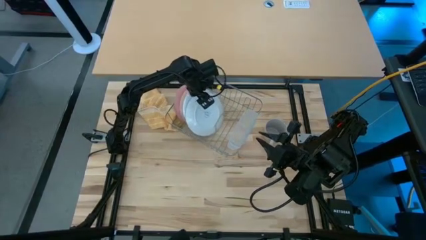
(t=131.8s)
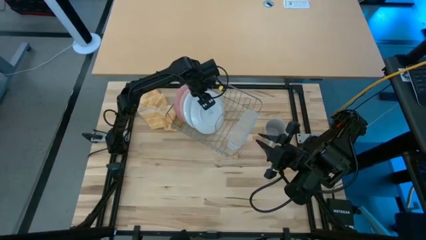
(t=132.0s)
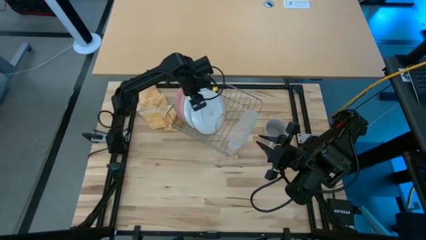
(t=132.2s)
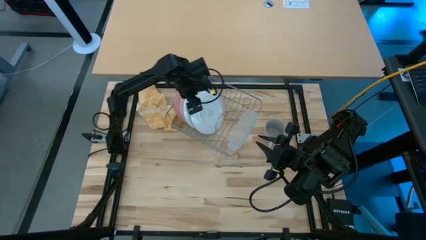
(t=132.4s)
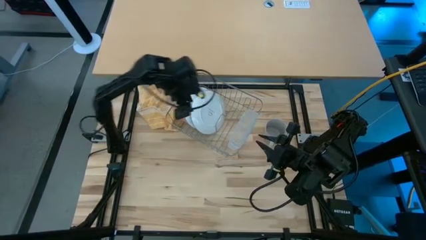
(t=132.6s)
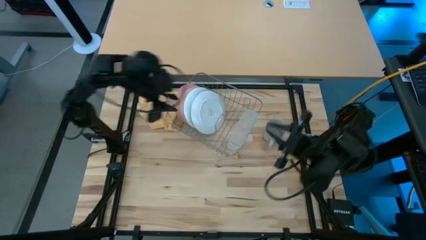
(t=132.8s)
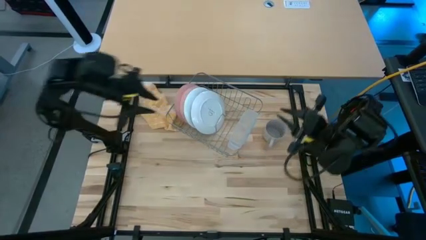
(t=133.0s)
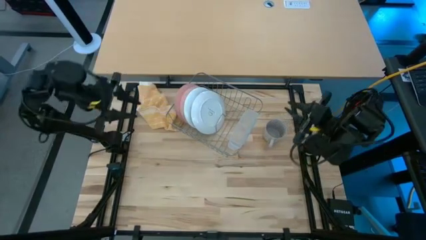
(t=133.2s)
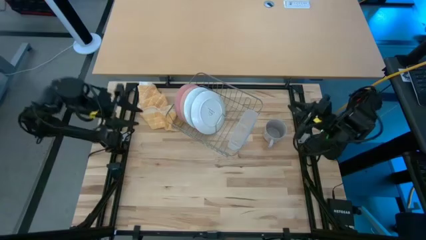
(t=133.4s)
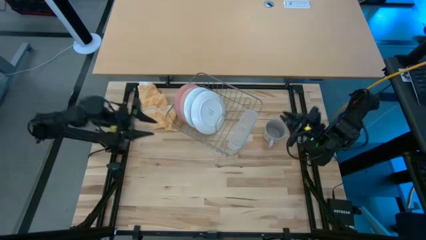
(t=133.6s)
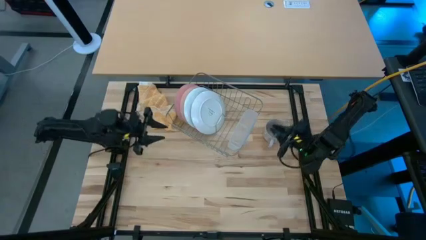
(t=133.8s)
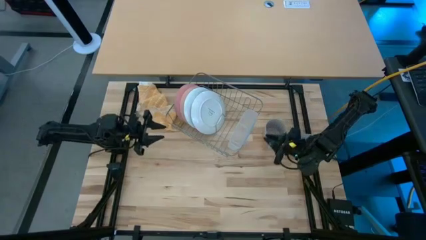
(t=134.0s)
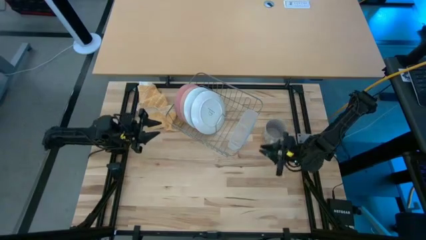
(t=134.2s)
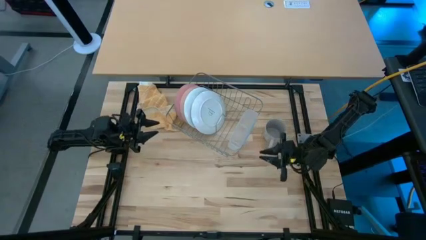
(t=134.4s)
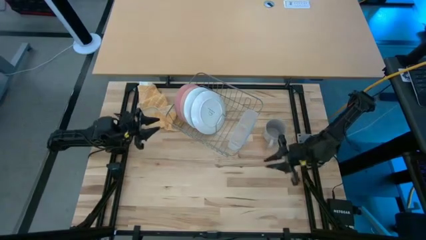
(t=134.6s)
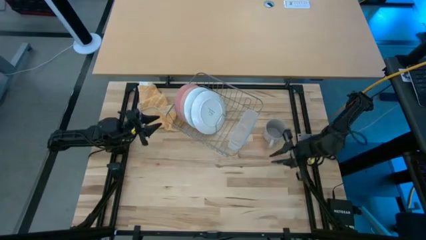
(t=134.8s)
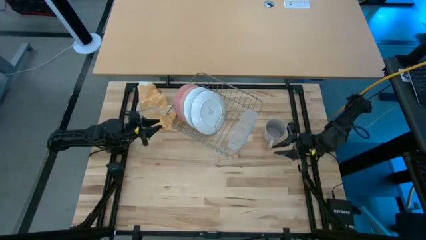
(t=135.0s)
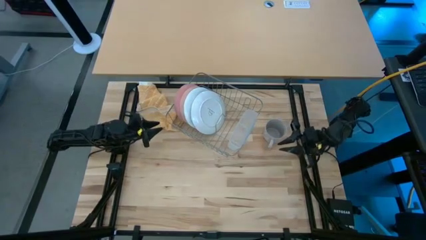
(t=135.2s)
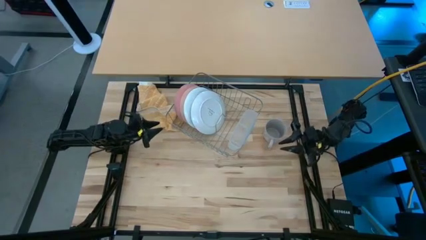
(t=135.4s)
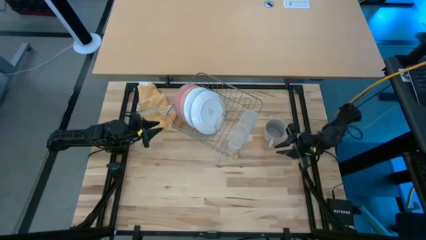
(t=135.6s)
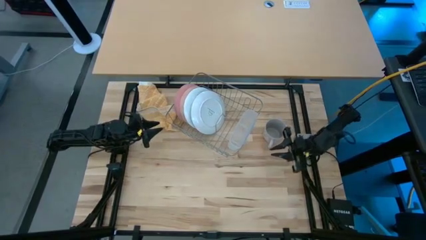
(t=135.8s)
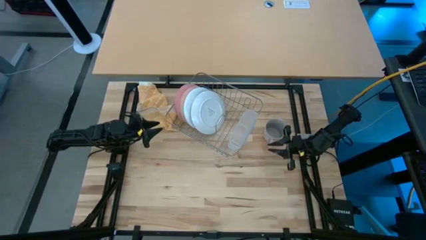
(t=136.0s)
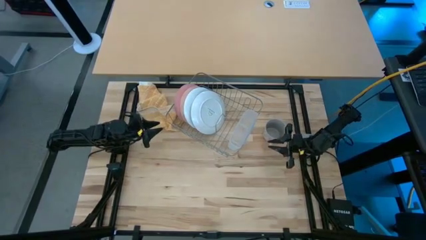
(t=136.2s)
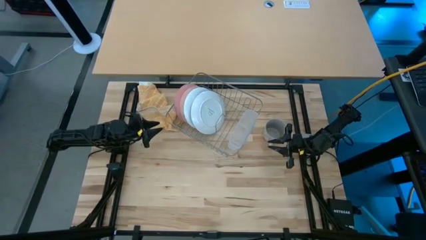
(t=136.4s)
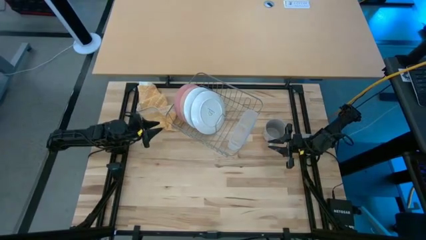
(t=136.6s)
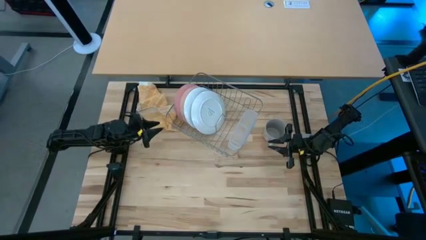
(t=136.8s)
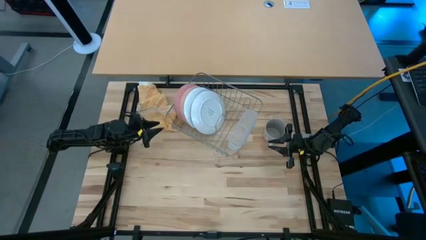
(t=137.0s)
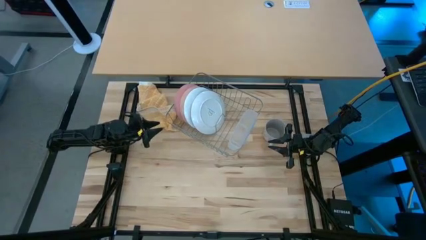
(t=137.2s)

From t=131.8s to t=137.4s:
Task: Sort dishes
Return to Home Position

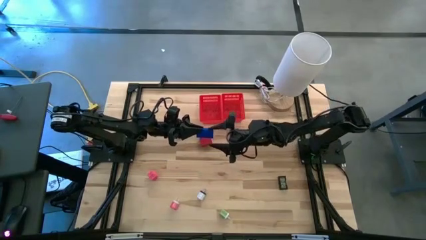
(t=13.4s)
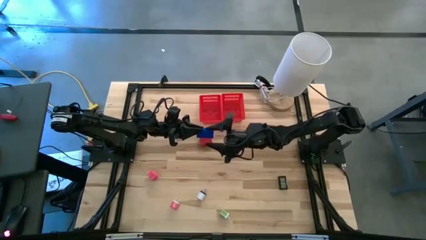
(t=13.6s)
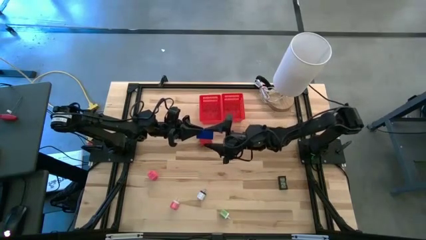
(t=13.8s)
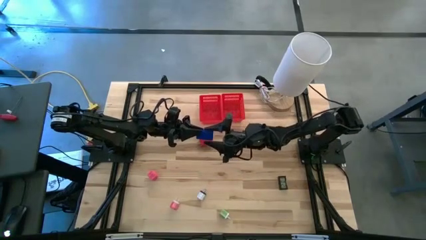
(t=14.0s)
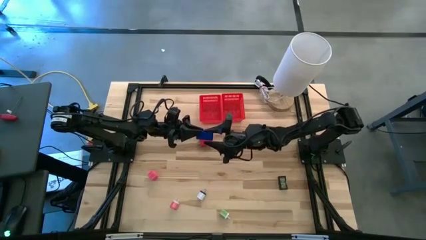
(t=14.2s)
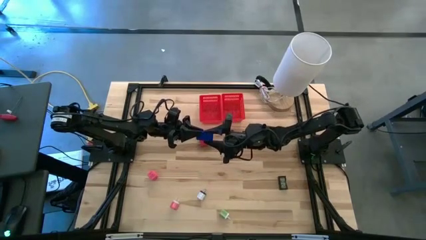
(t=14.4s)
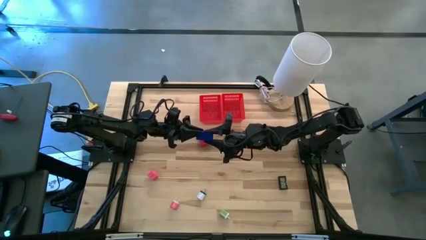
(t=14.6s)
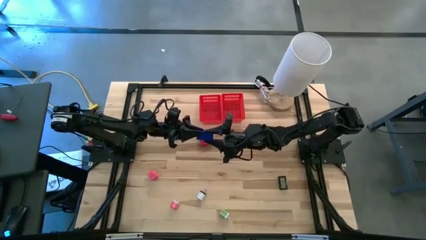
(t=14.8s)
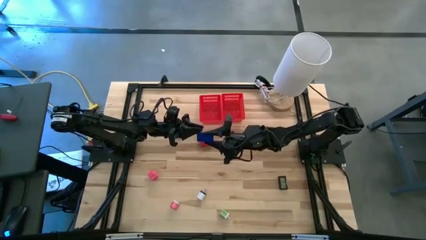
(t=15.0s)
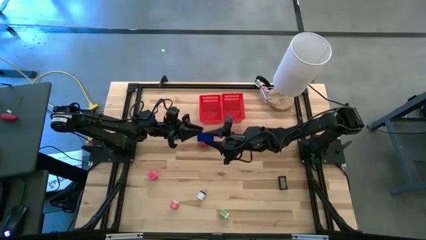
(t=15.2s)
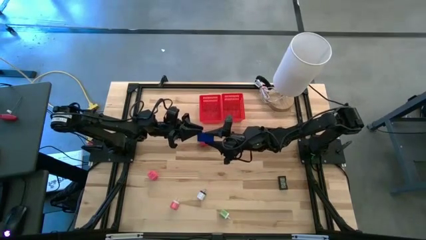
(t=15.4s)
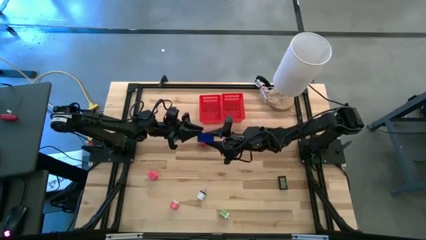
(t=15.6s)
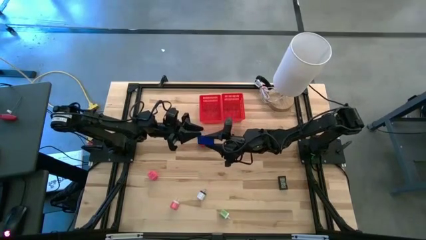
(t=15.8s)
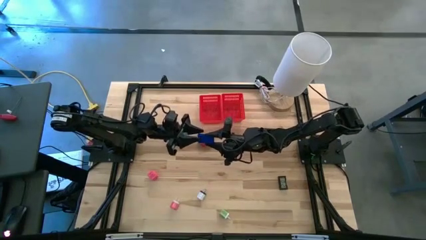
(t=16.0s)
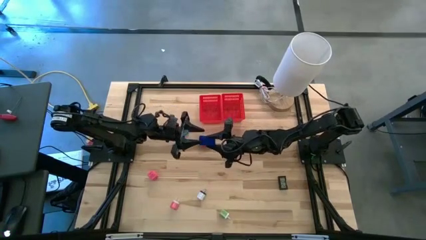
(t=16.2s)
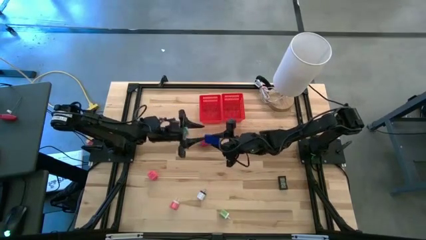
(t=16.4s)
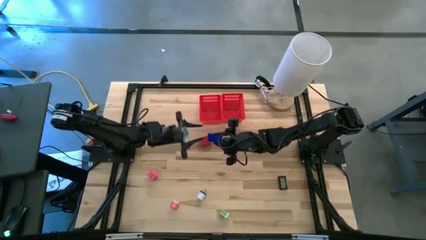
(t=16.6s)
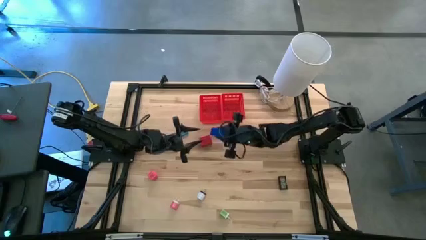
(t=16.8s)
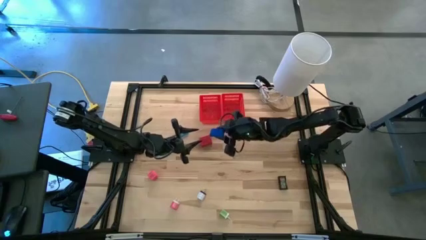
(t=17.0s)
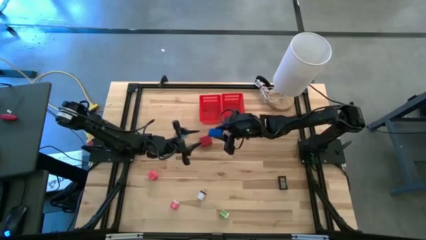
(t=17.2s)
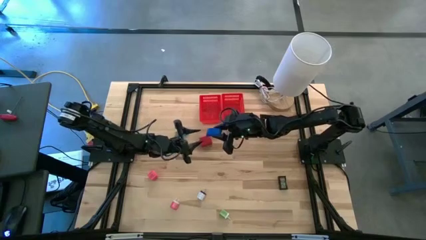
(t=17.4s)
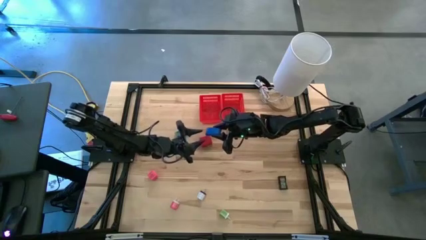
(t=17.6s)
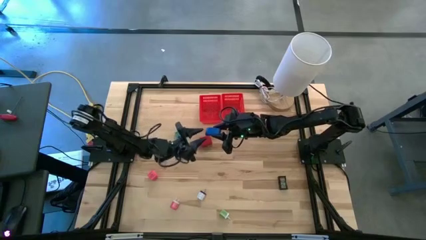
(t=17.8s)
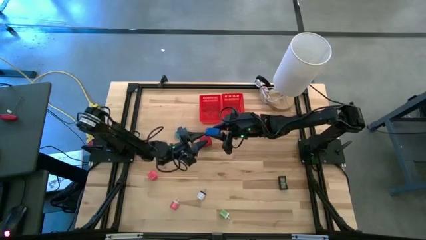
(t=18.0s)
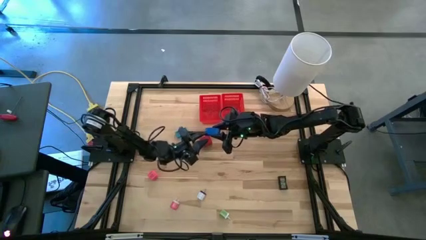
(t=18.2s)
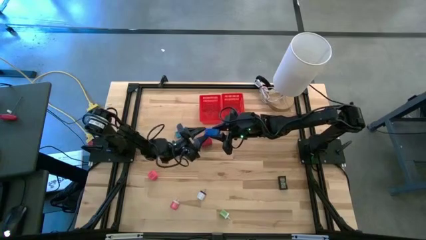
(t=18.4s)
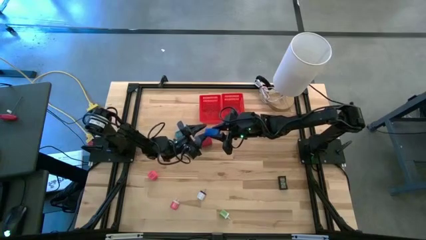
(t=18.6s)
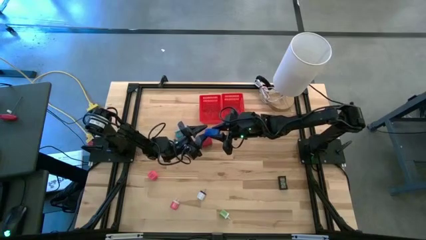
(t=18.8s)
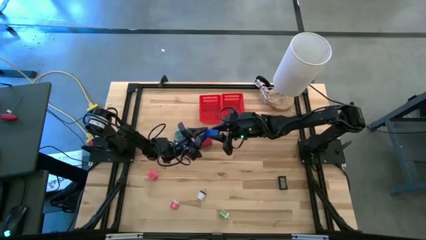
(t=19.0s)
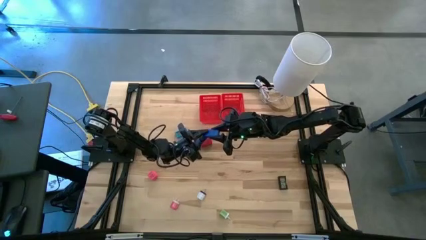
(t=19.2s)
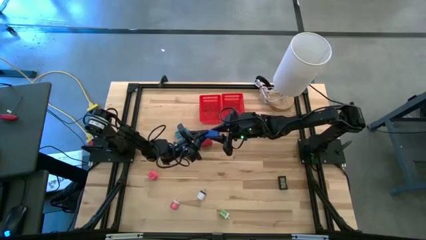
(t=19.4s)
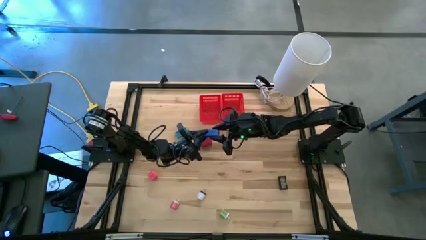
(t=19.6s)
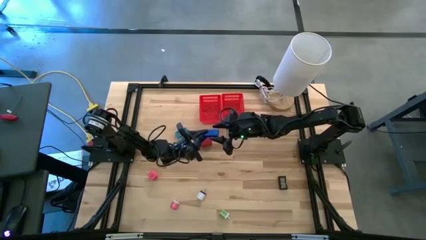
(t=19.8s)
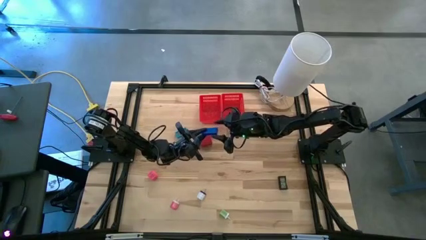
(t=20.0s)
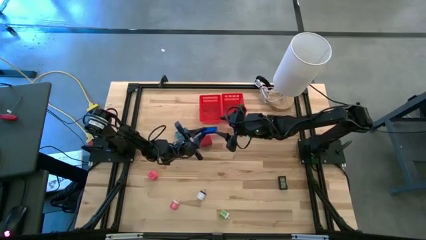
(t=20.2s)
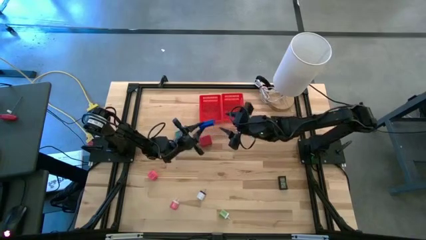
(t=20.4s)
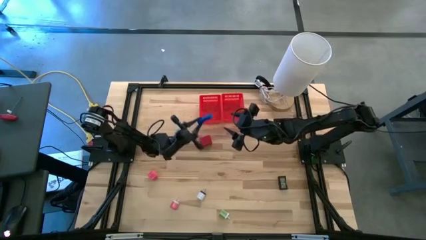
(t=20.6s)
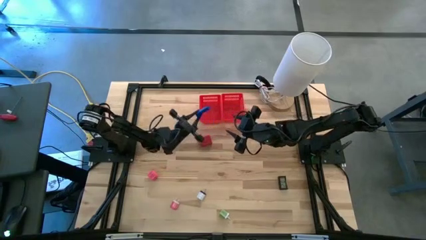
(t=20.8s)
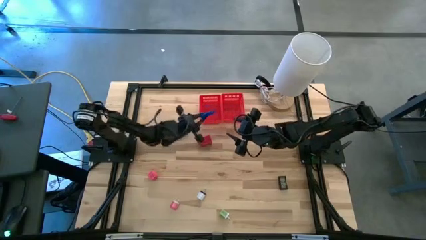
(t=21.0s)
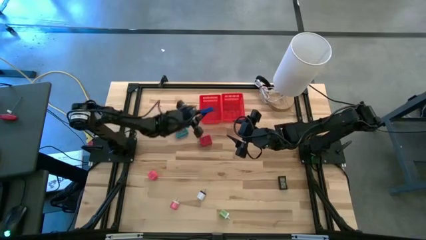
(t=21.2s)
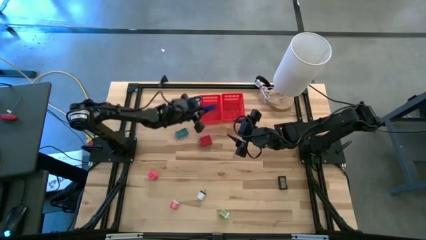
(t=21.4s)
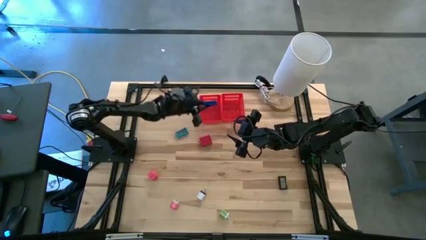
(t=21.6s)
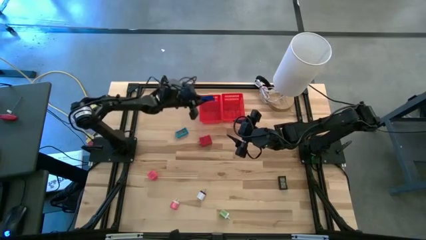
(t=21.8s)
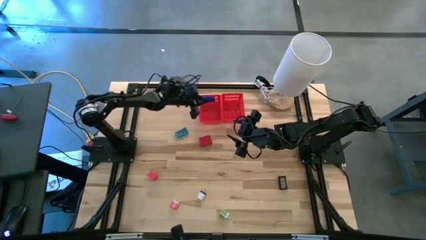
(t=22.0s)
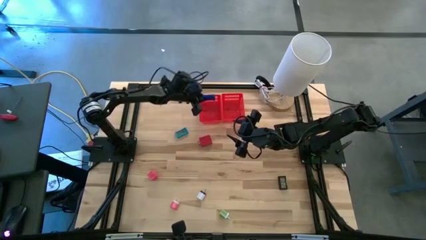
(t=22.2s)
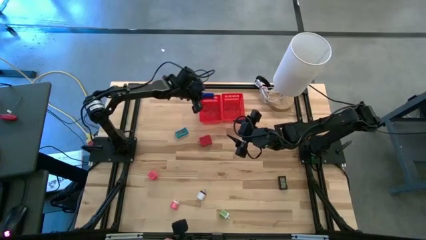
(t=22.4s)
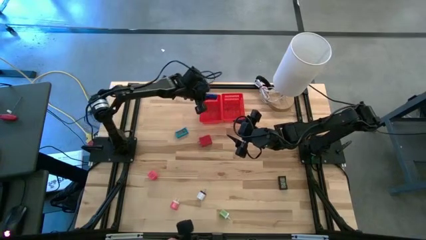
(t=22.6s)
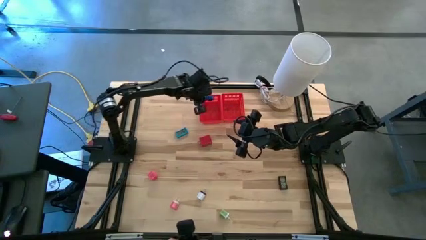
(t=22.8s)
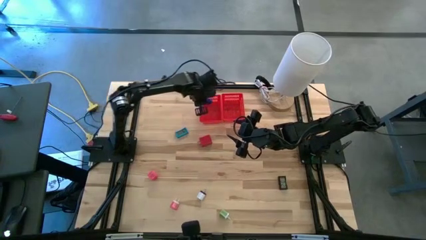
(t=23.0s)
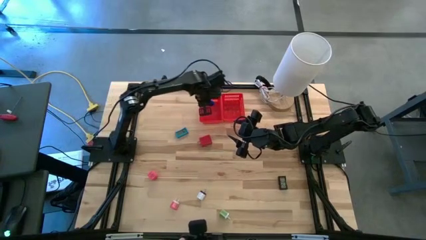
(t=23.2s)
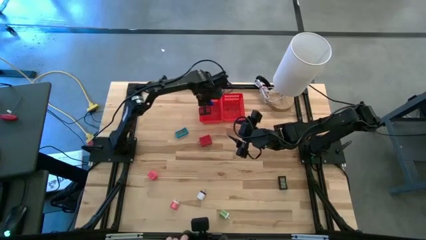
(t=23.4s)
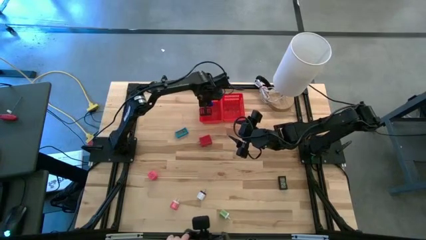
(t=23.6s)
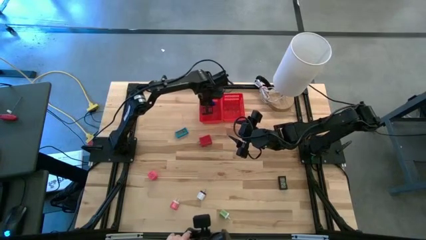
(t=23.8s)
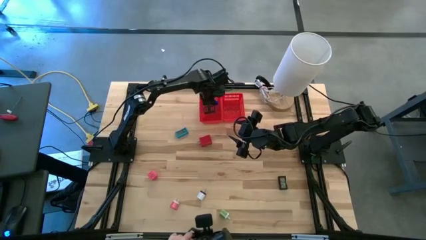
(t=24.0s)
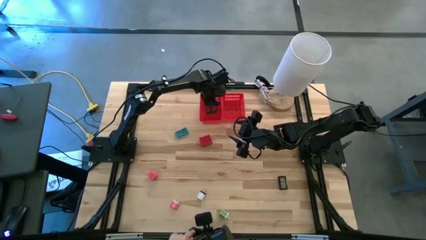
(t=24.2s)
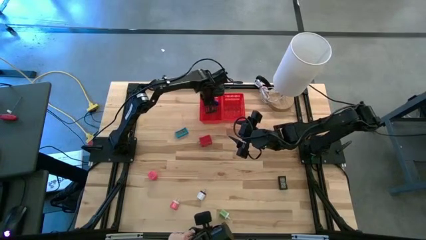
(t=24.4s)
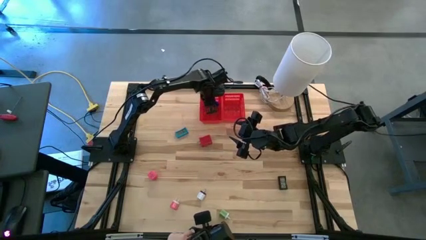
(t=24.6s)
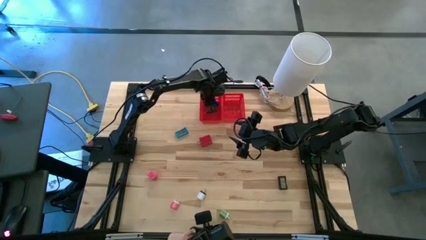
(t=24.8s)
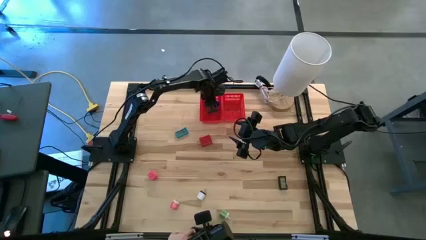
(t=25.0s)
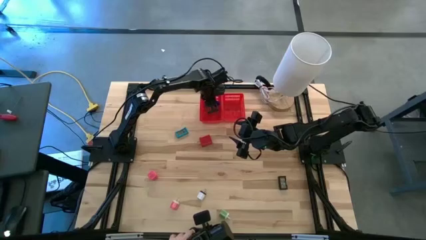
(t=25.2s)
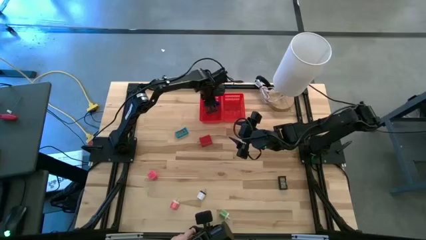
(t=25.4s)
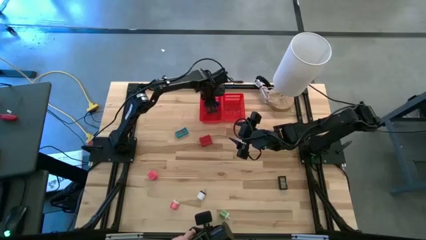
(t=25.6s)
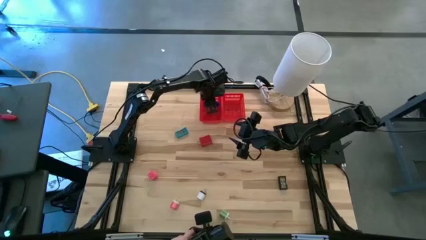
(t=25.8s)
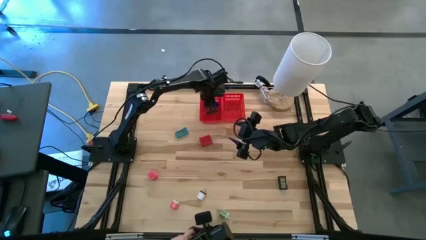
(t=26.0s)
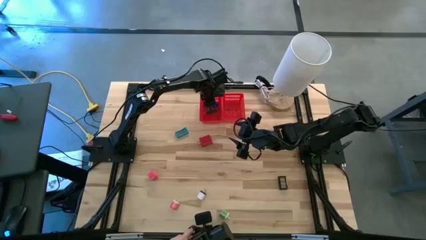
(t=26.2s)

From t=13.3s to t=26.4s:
Task: Pick & Place Office items
Put the blue digital clock into the left red bin
